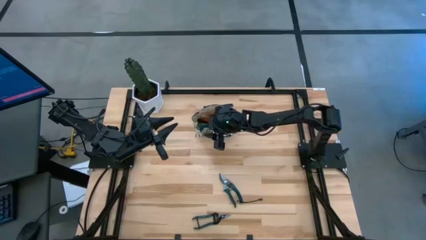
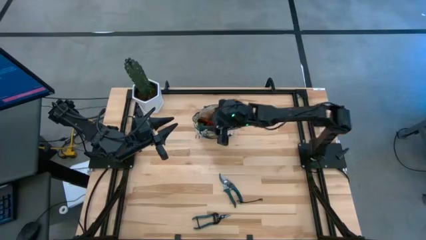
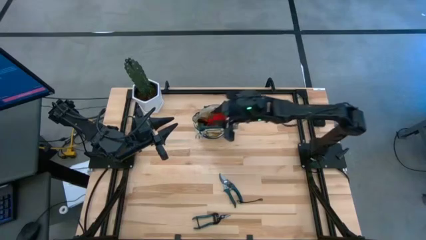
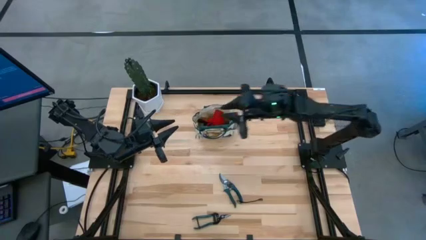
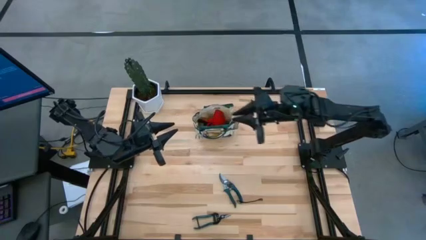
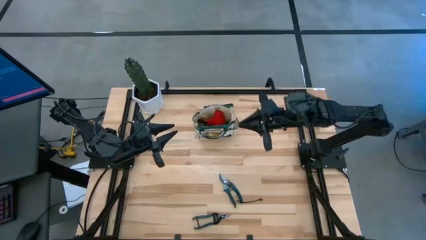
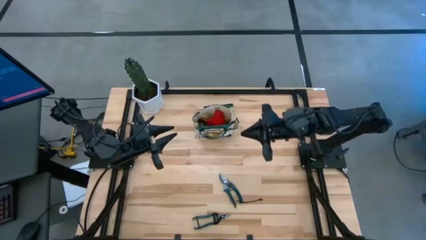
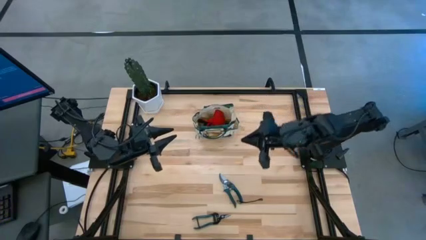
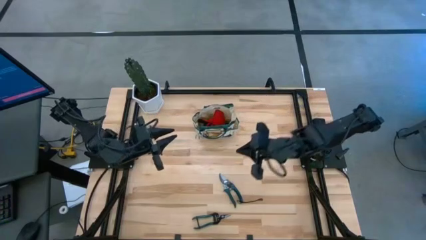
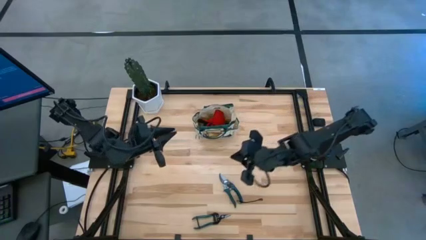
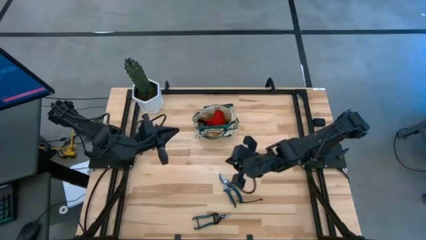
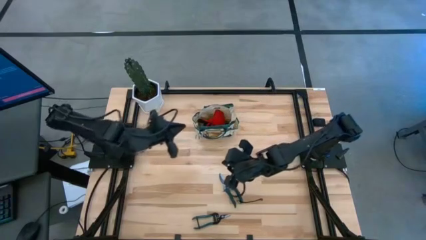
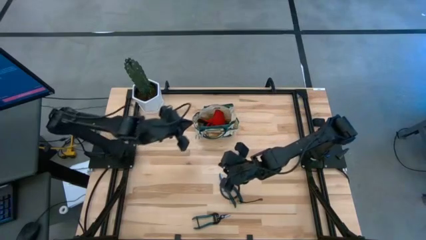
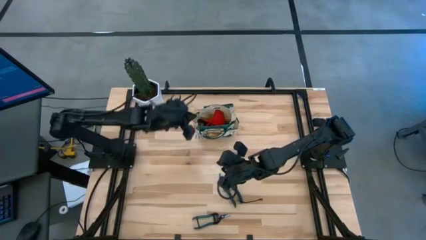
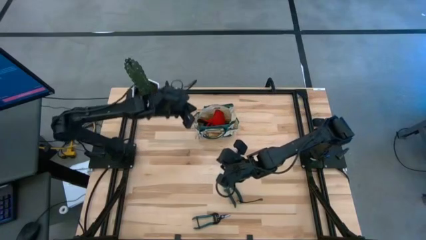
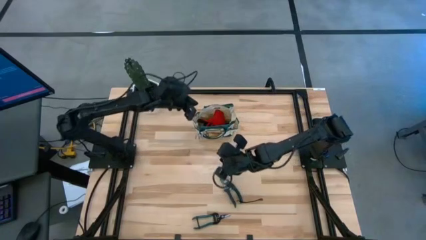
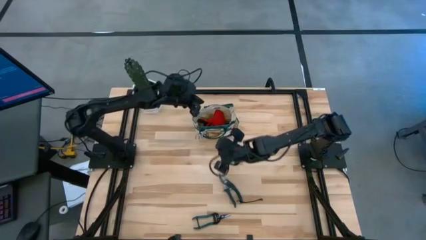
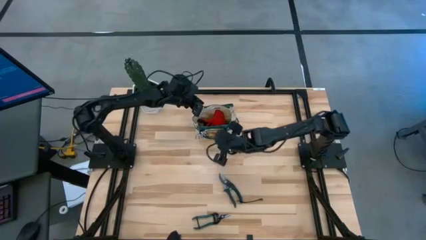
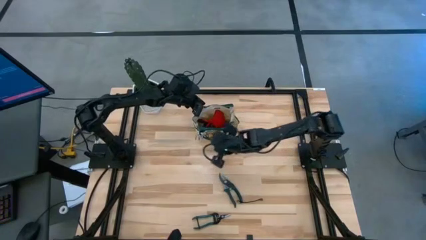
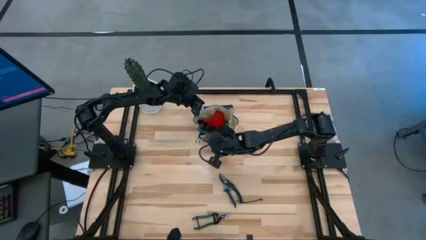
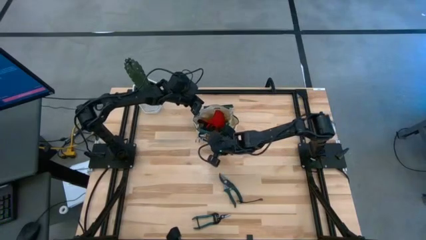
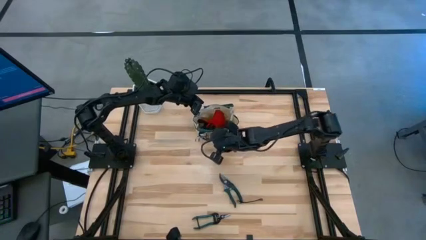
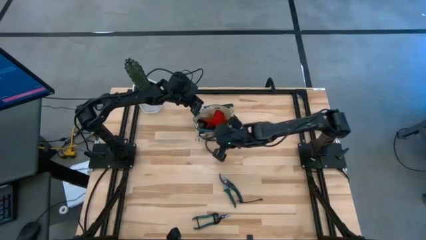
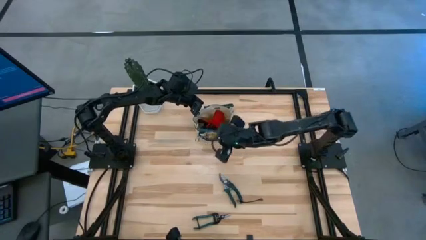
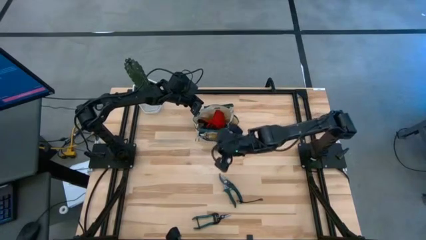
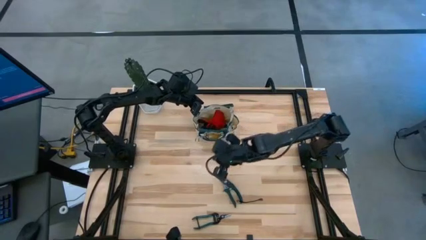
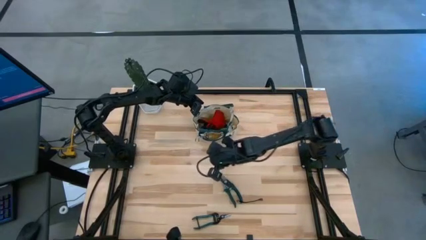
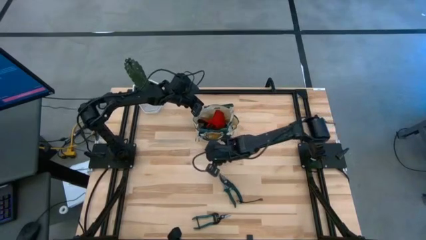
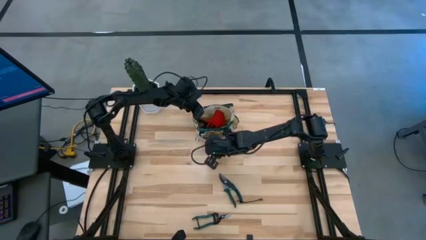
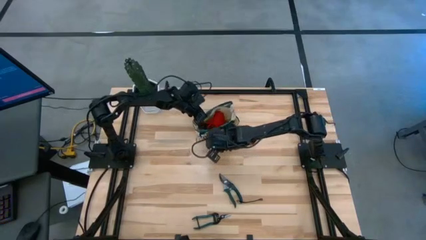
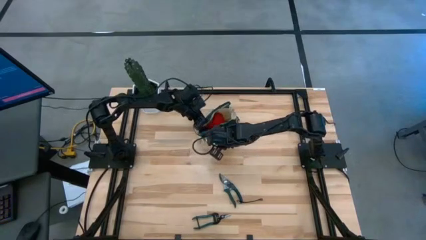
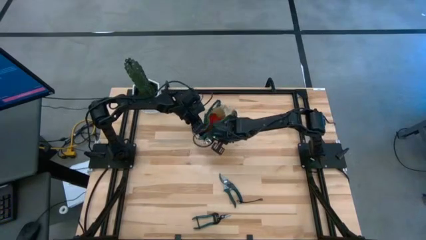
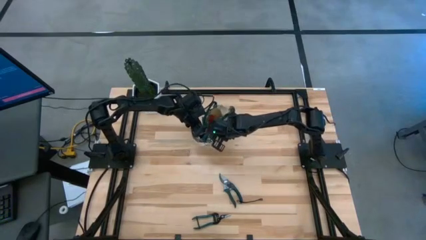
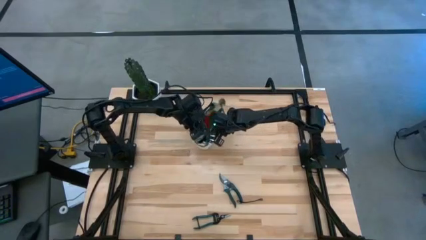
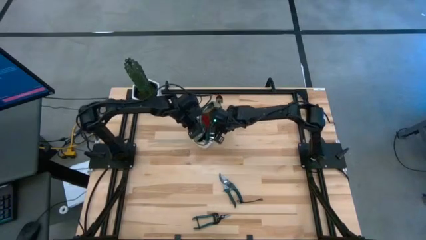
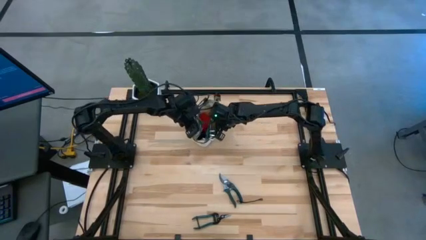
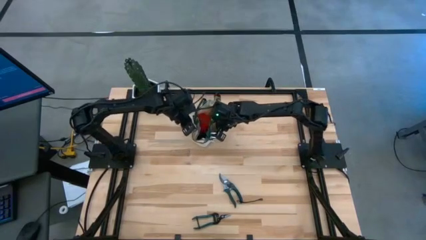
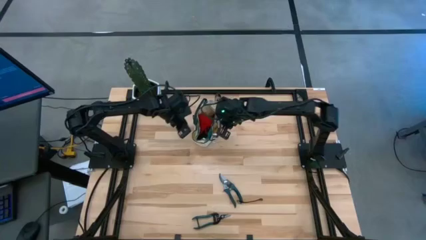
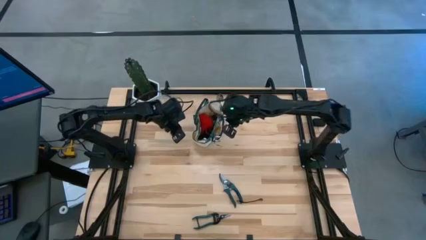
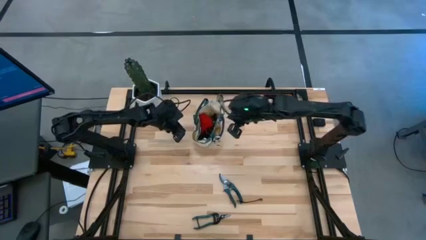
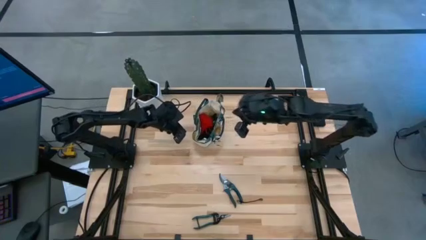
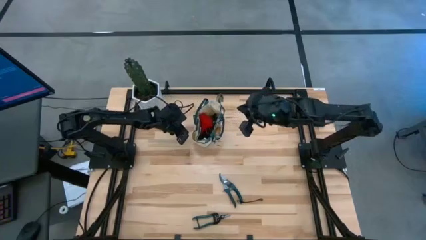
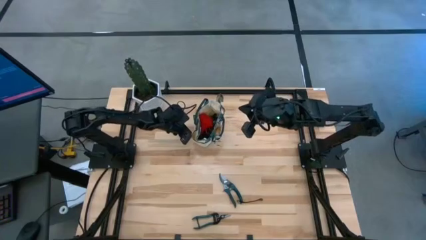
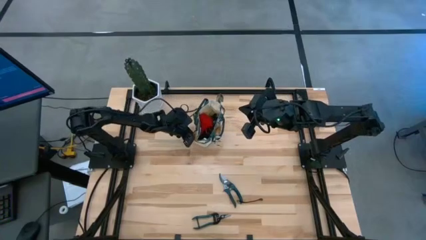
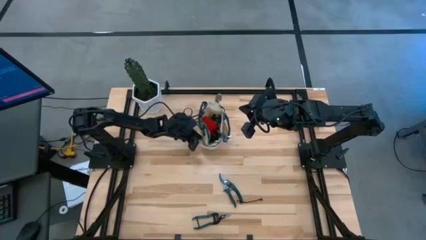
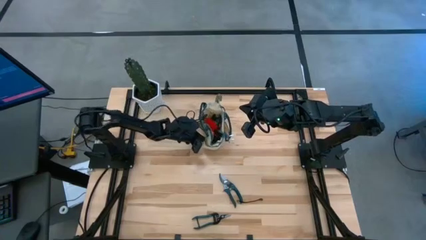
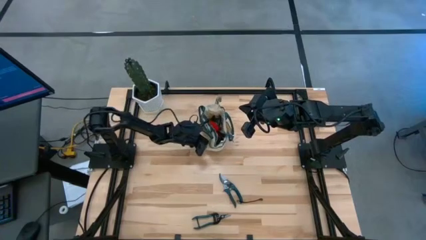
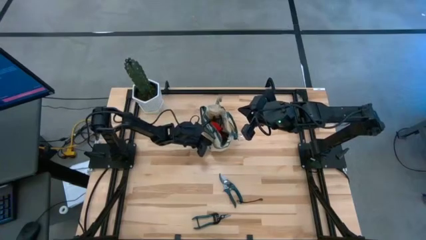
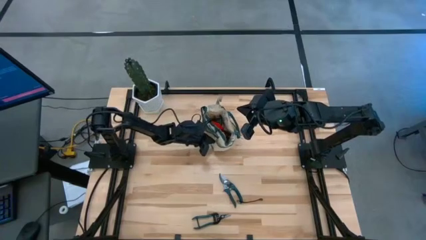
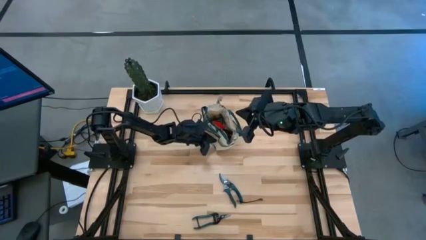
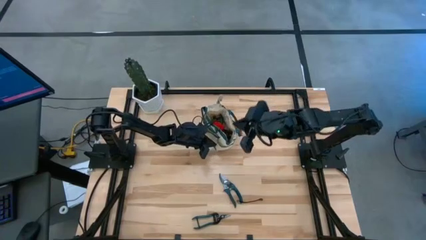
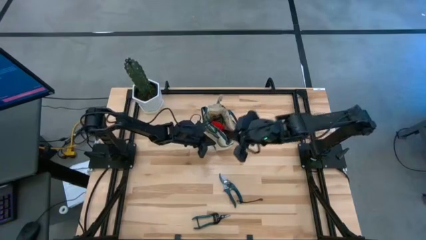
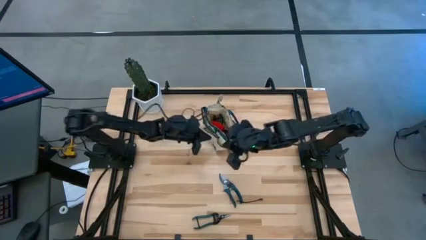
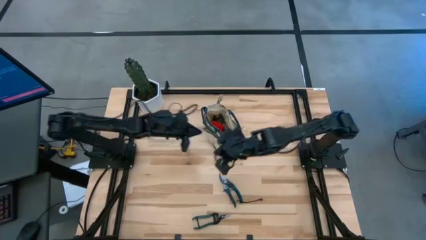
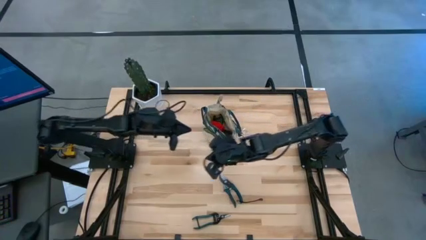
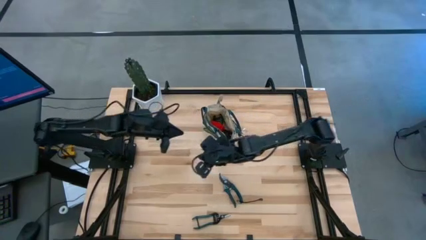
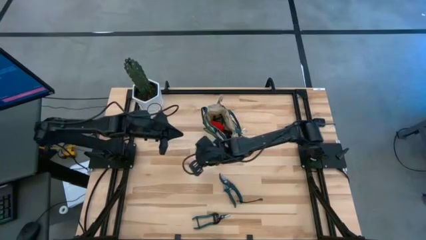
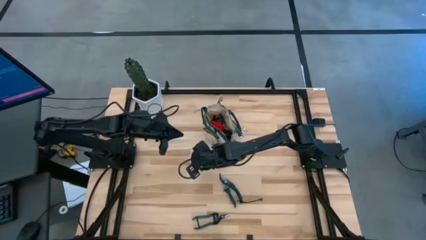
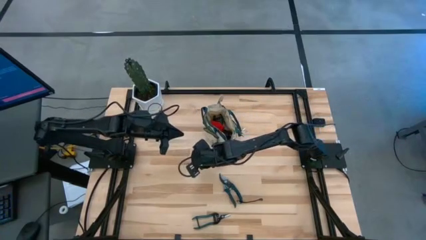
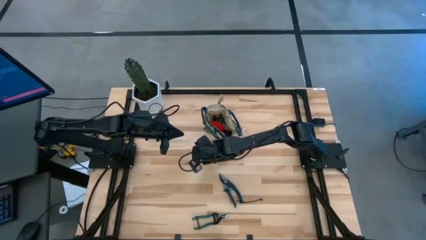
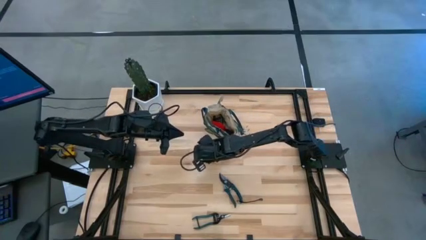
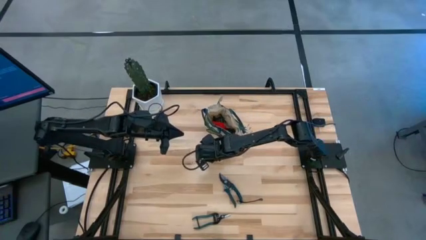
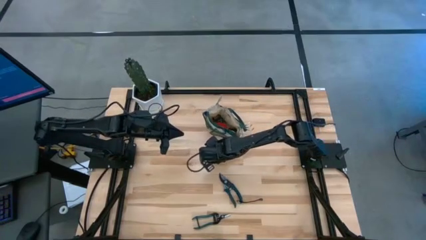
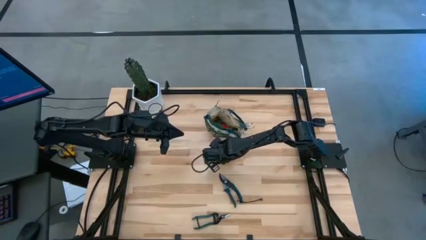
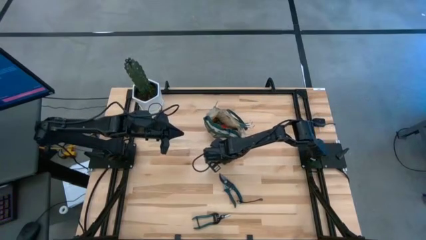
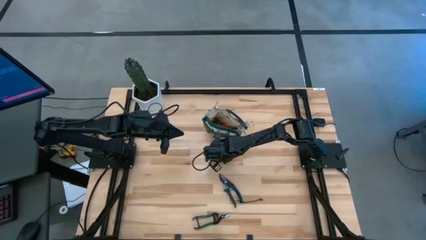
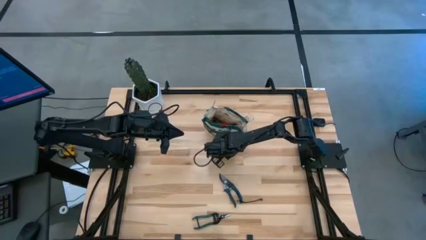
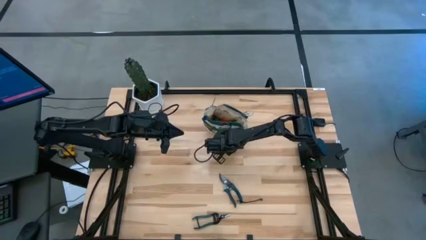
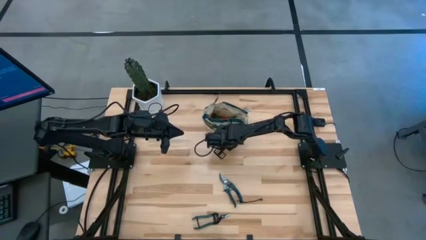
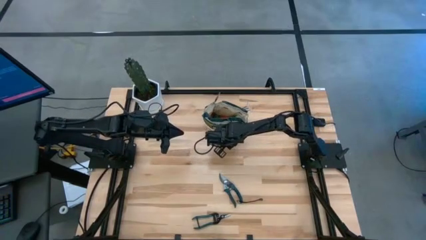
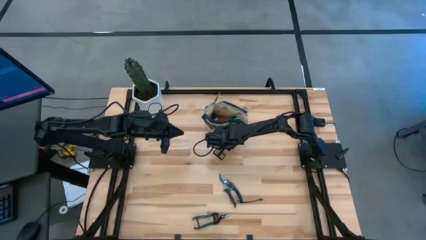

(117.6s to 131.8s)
Task: Pick & Place Garden tools in Gardening bag
Adjust the gardening bag on the table
